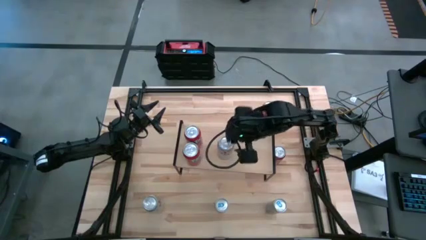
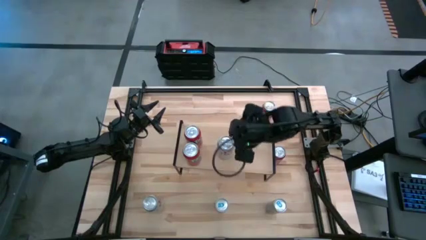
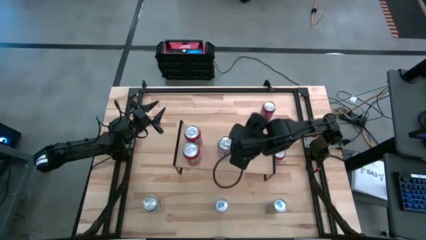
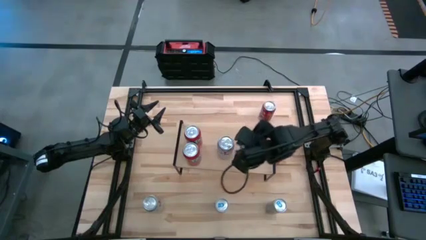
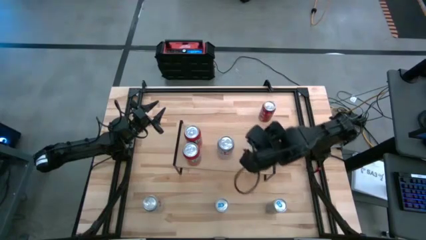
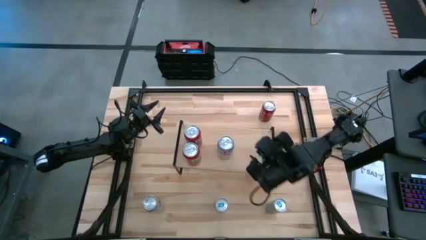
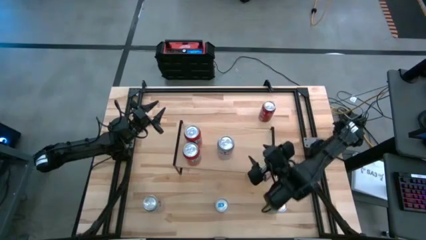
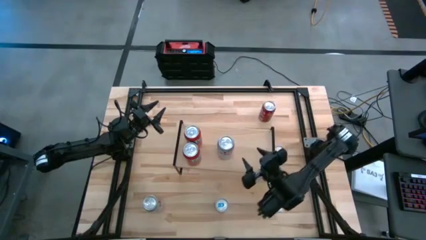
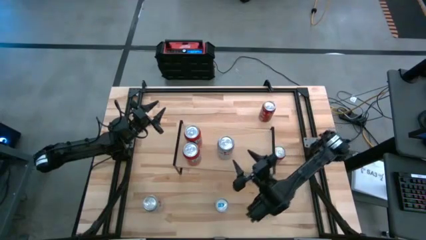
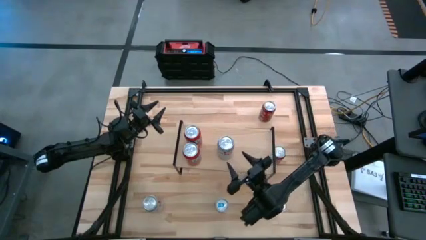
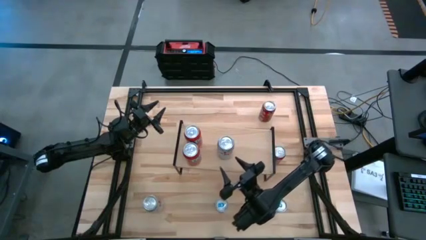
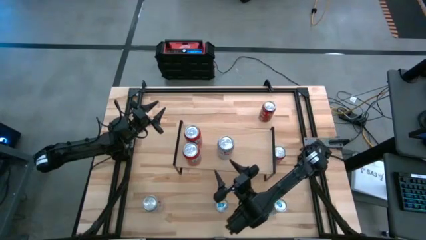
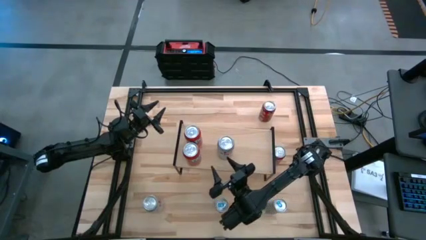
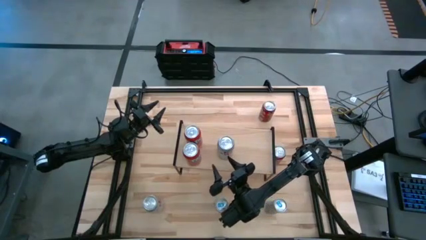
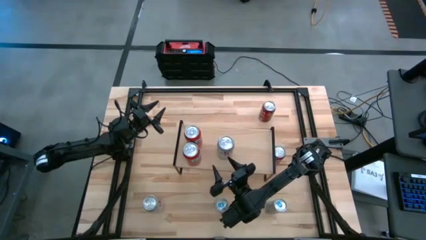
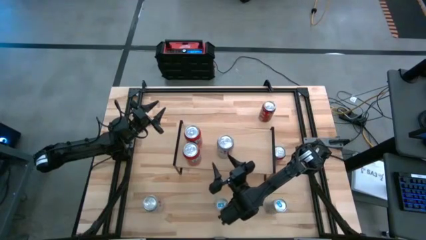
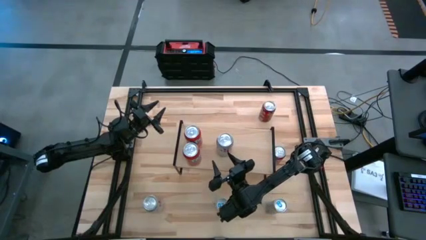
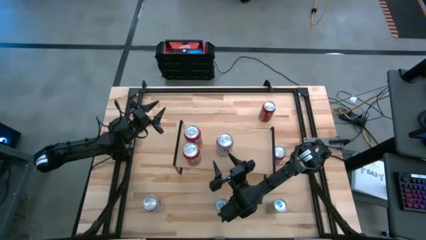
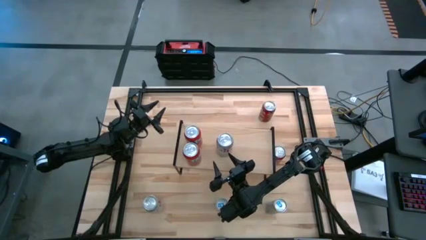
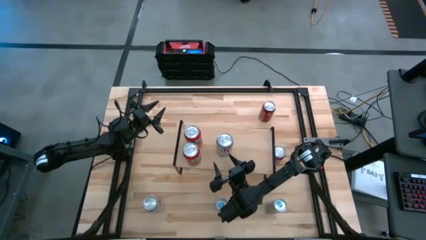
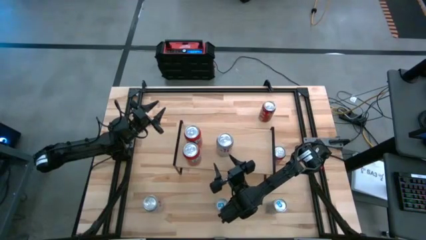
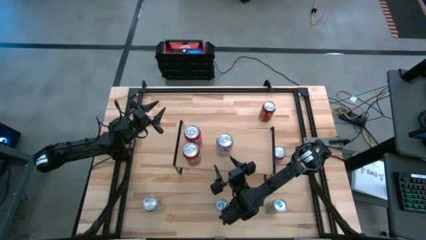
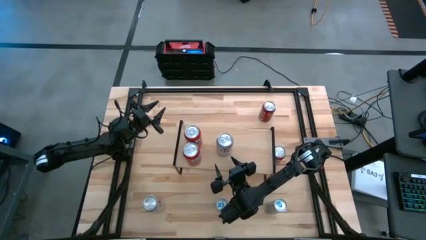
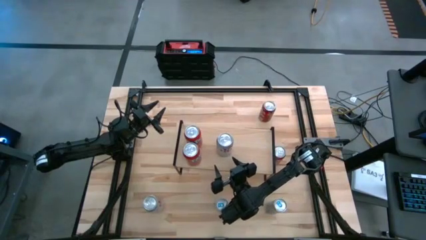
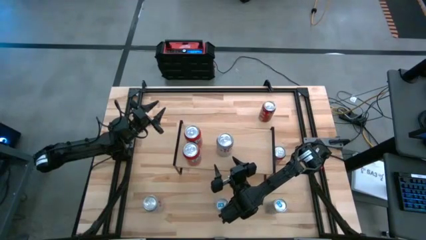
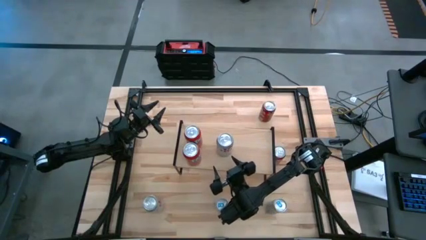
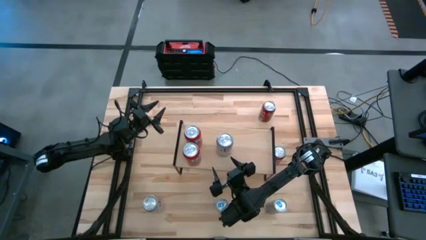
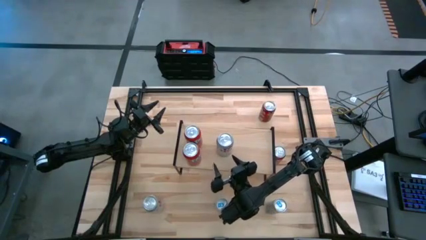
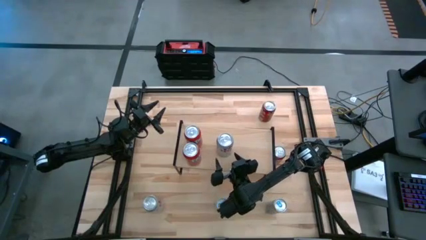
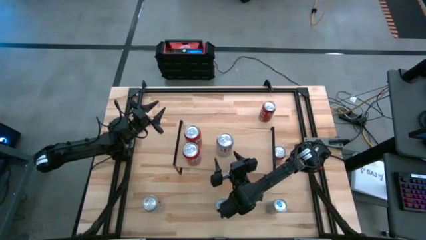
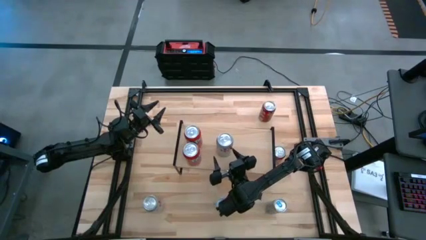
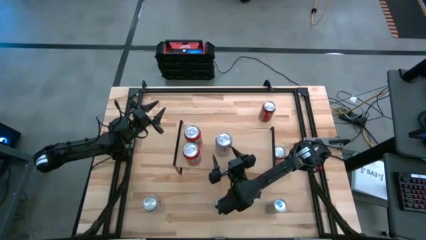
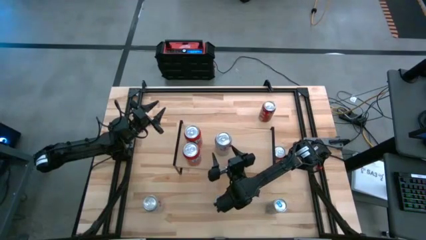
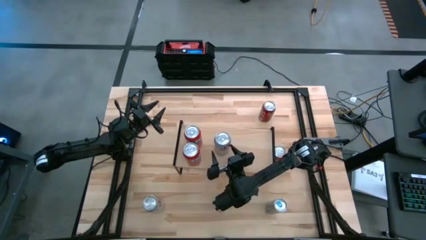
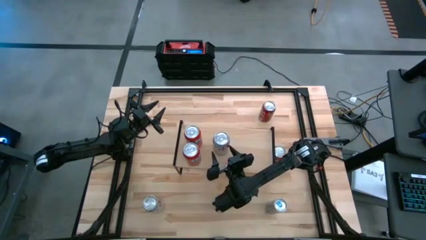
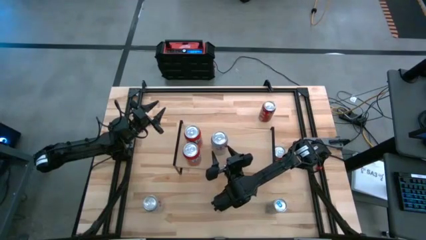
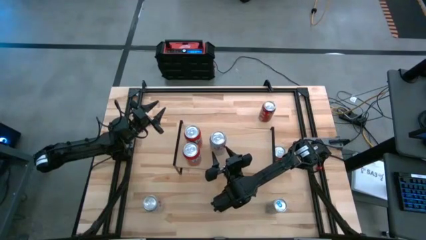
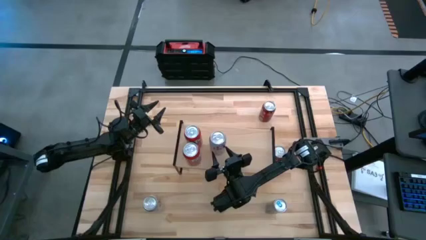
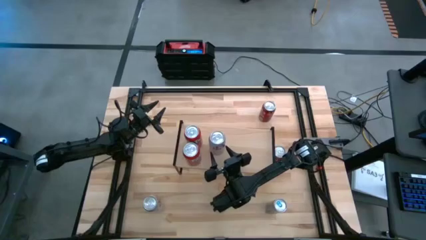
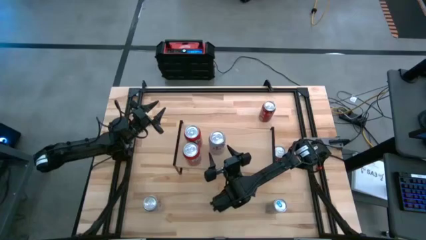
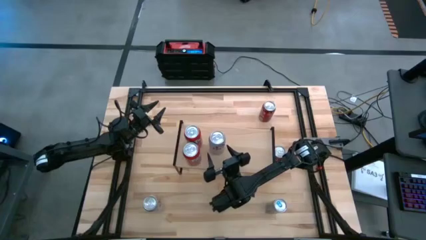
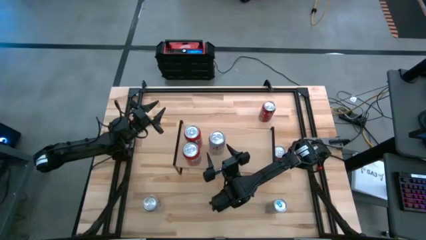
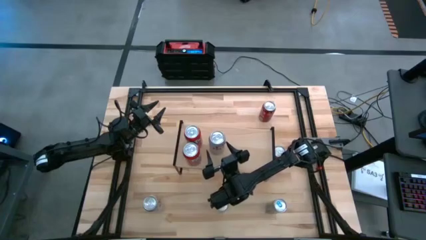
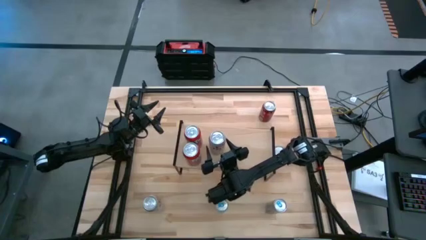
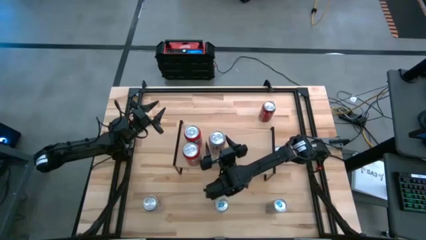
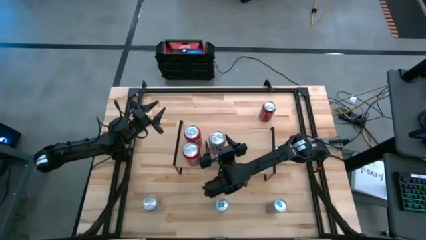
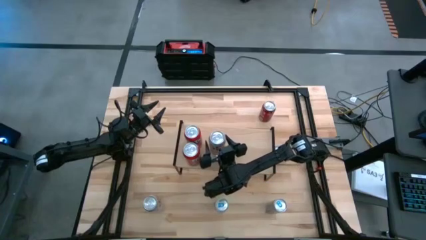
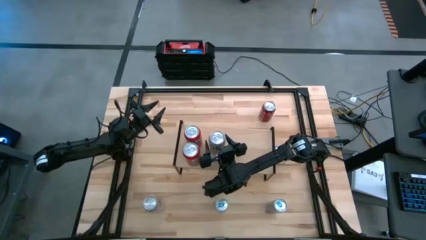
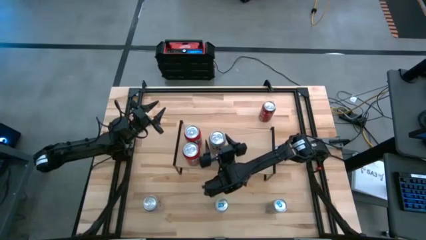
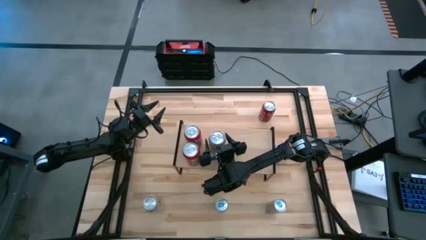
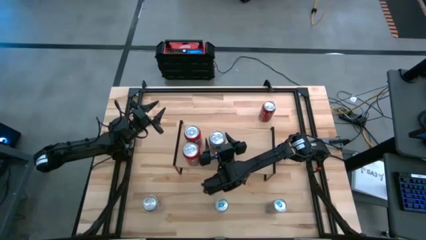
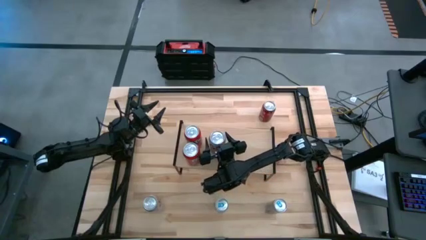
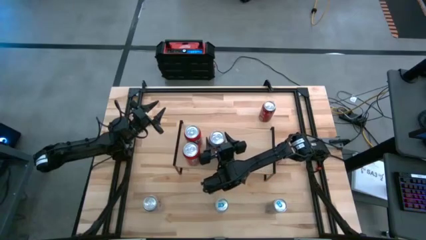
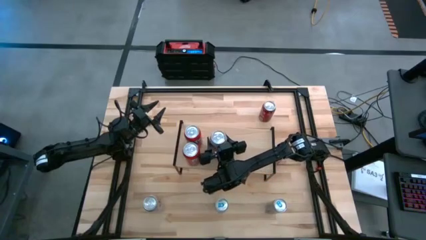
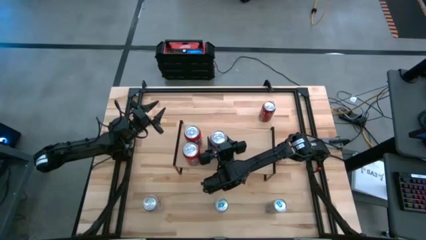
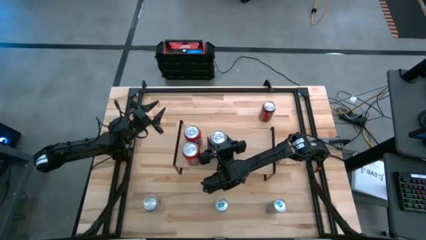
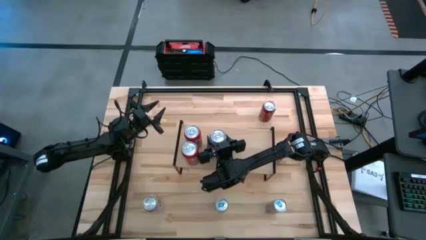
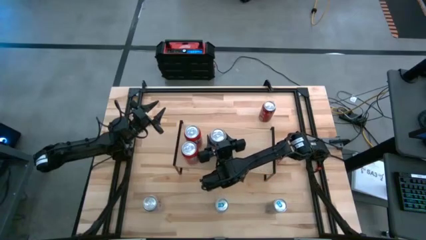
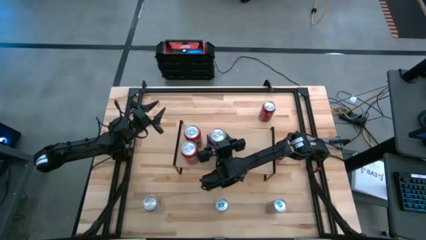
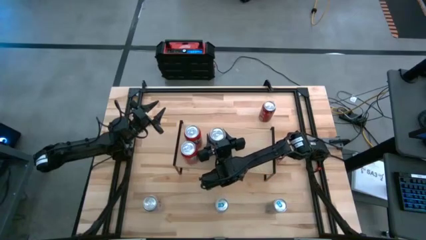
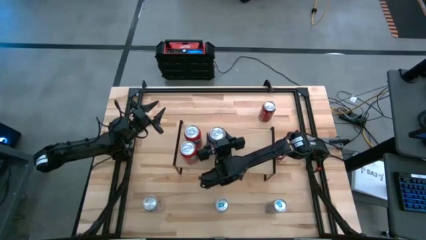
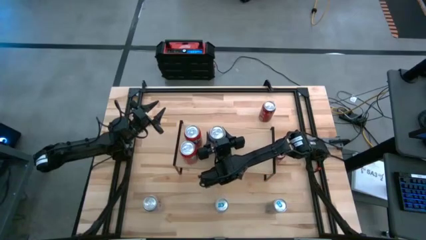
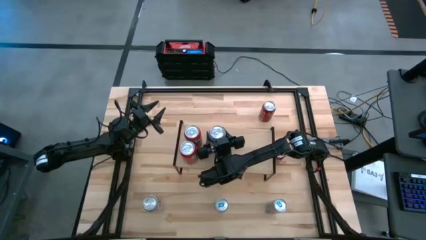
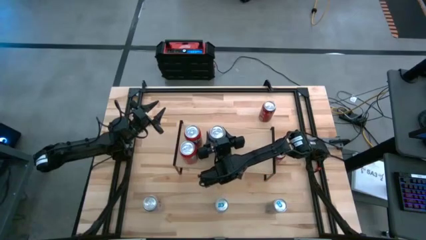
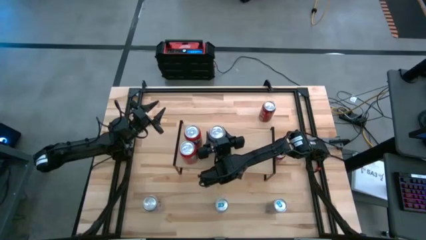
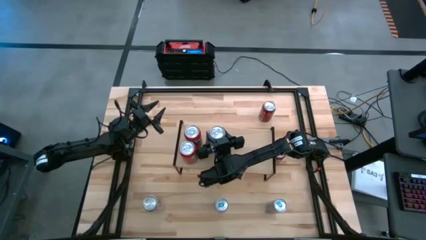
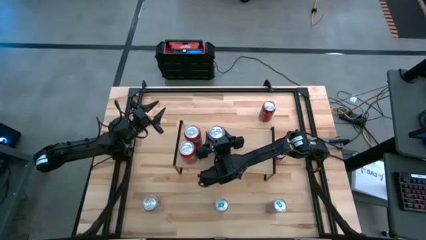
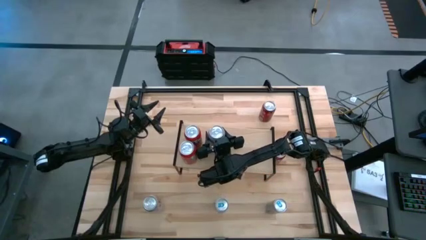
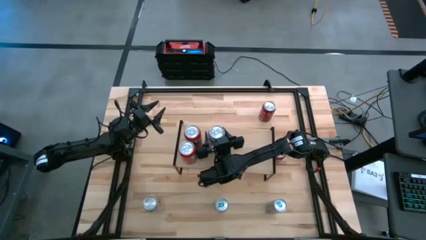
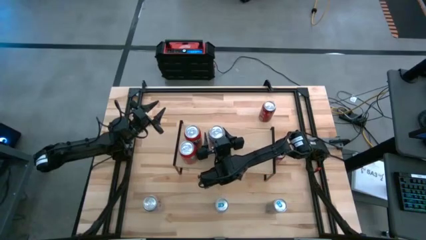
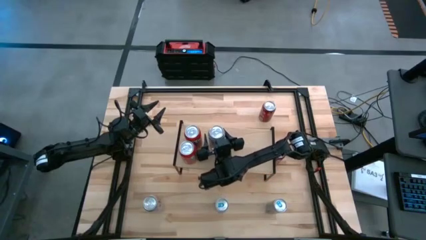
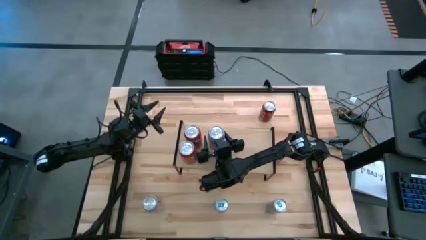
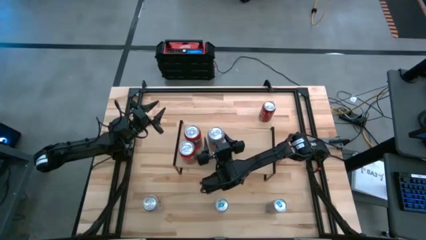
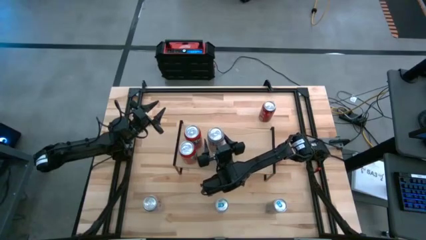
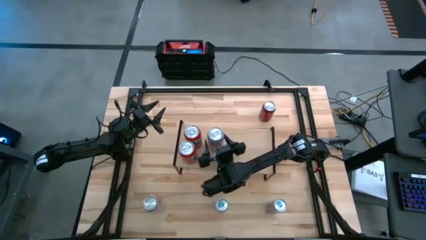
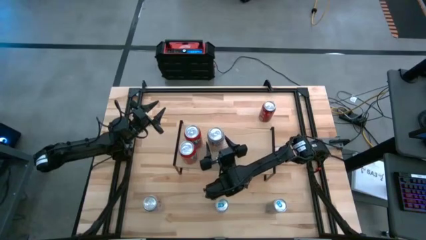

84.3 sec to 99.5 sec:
Task: Place canned beverage on shelf
Put the top silver soda can on the shelf
